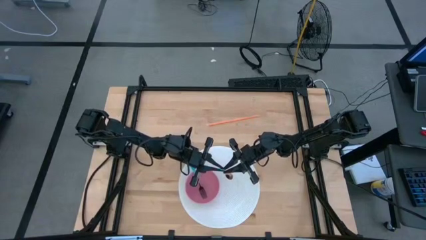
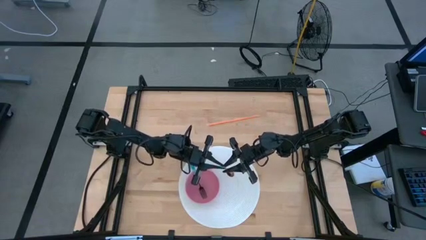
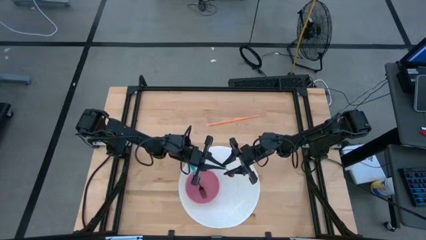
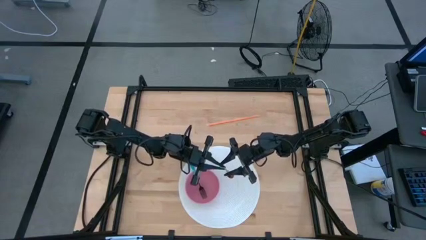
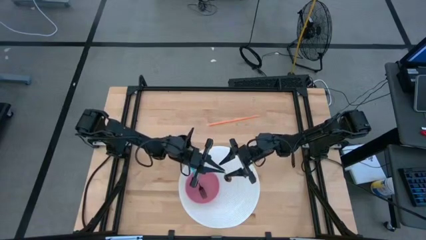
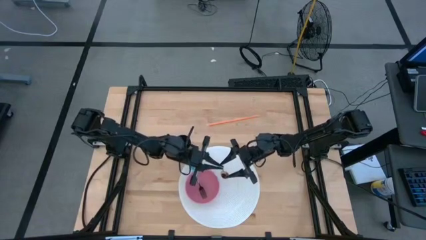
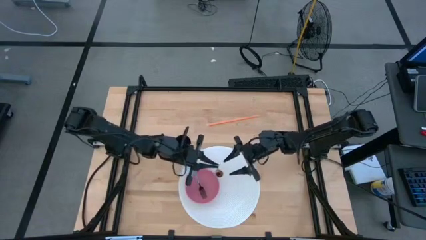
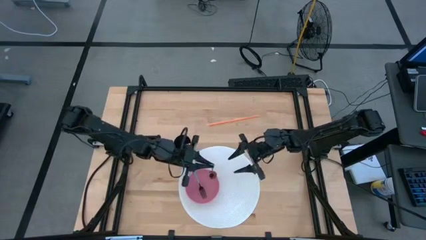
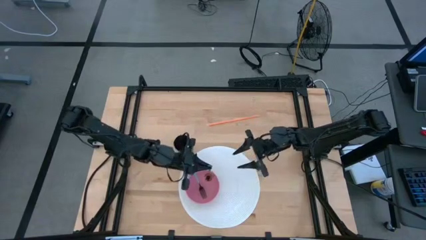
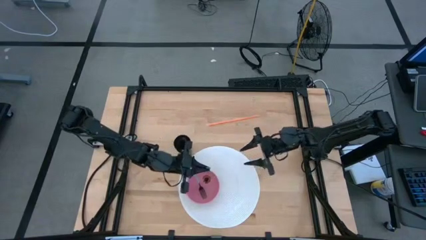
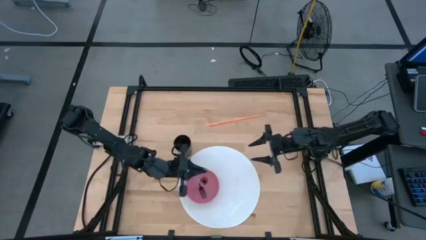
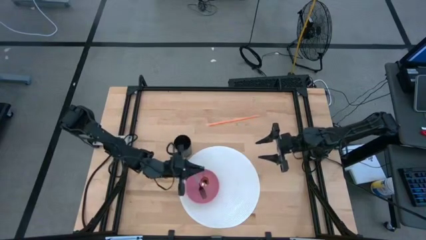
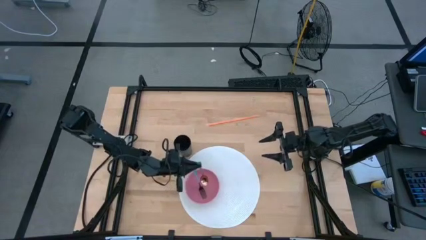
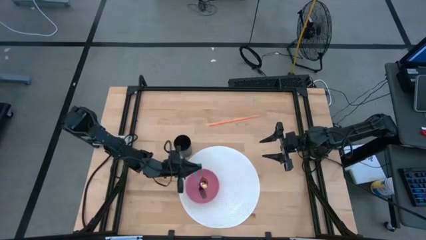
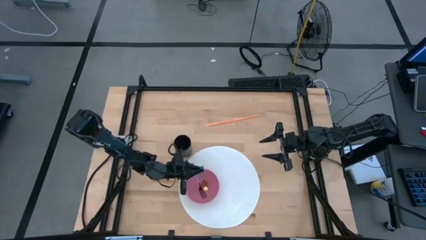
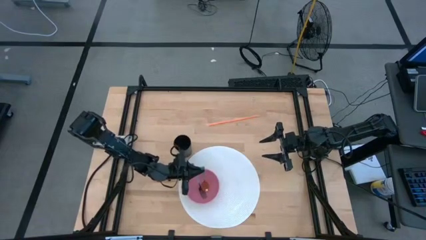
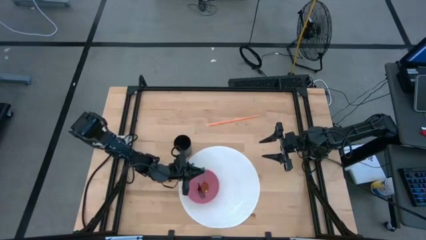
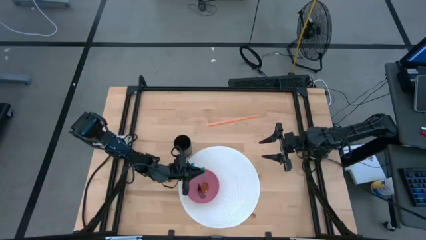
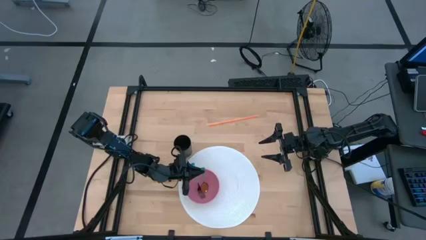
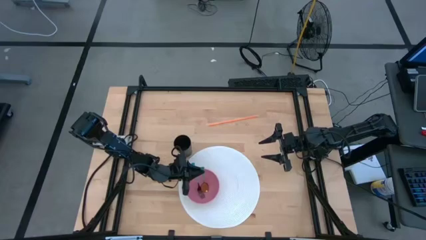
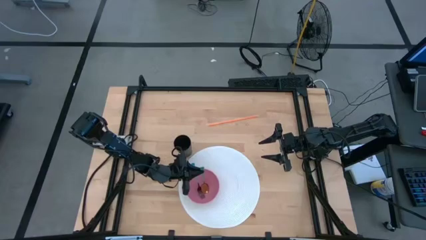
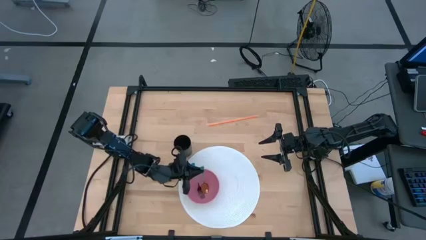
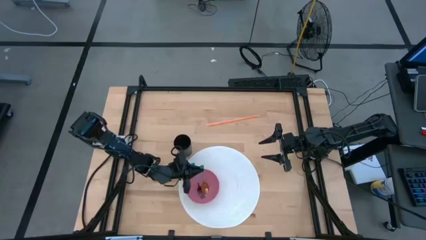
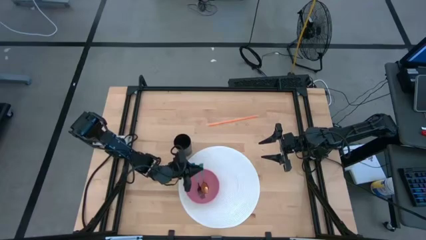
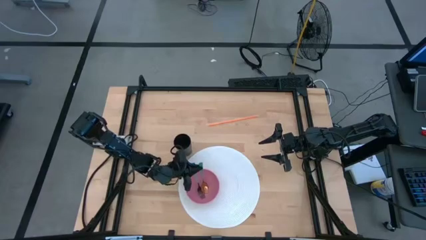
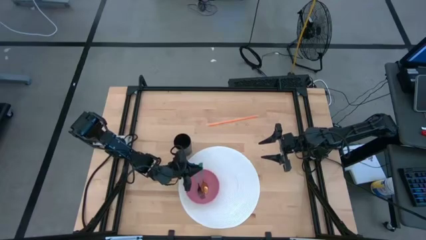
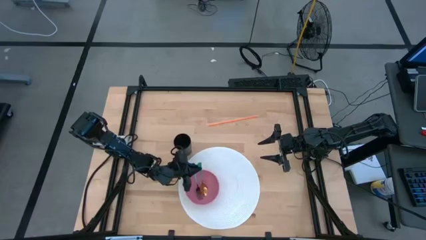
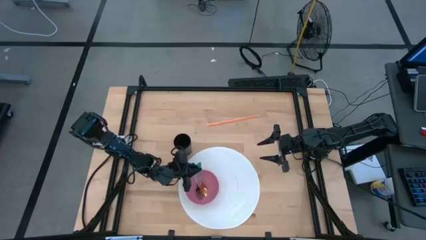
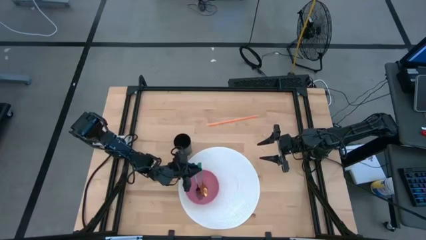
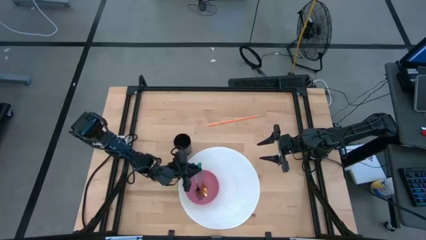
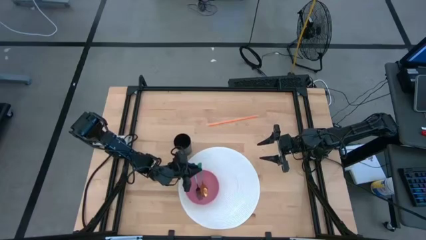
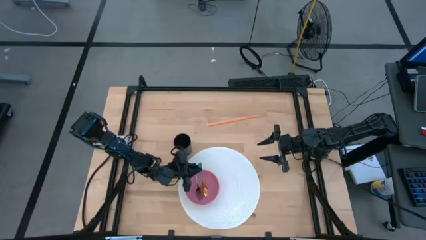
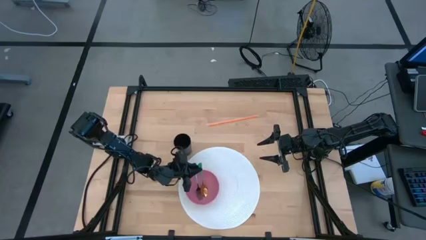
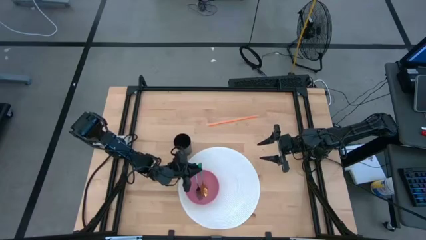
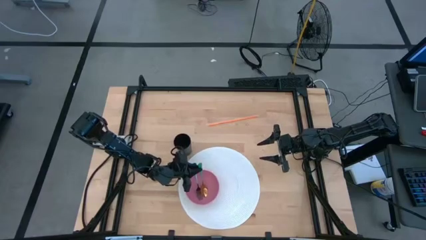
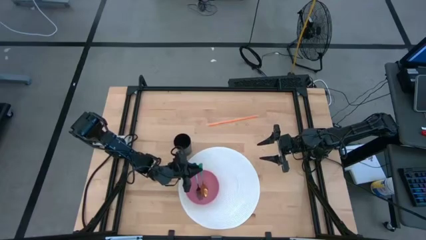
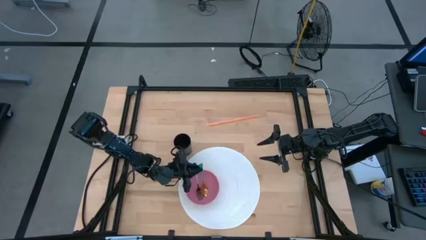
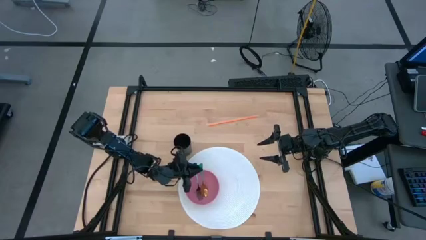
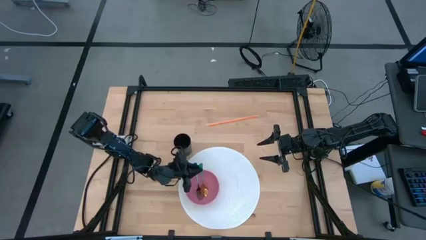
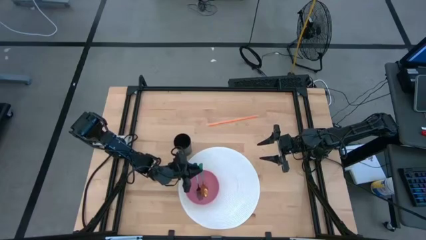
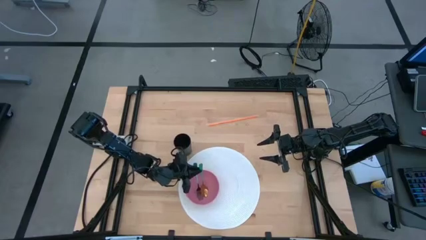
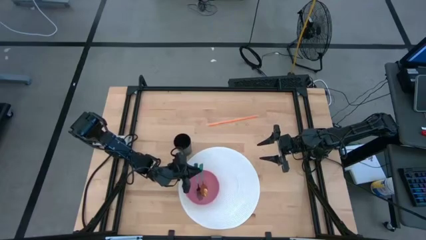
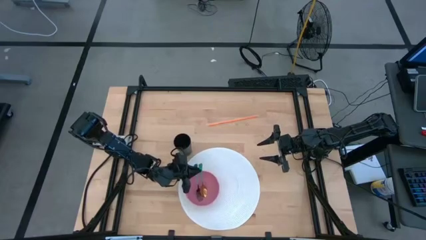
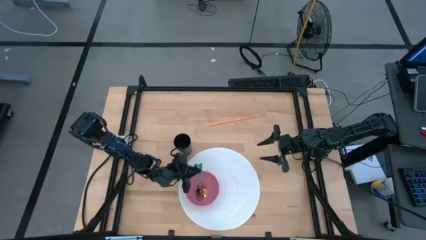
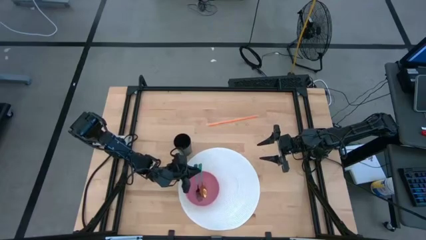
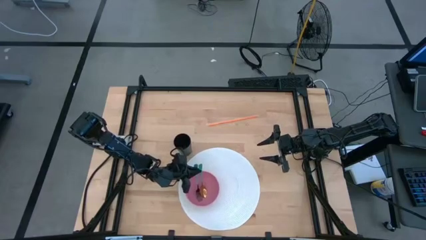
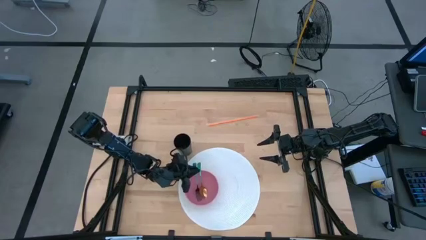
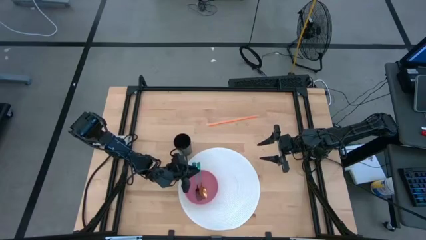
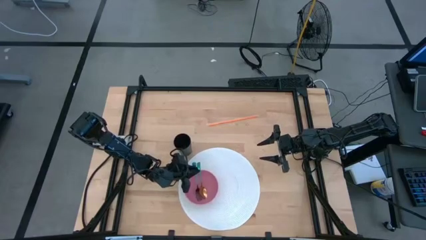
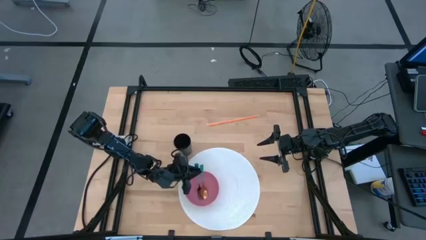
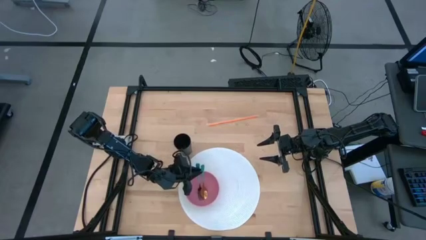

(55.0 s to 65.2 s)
Task: Pick & Place Utensil
Put the green spoon in the pink bowl
